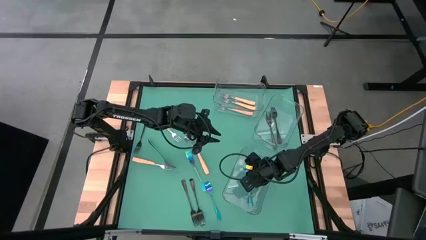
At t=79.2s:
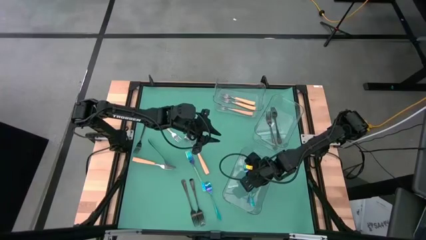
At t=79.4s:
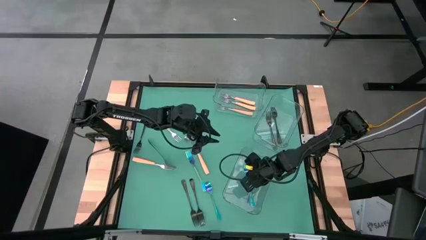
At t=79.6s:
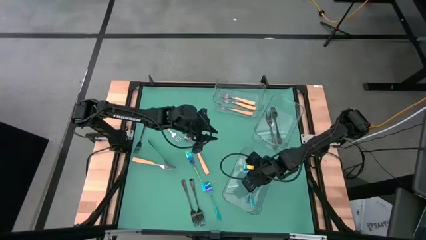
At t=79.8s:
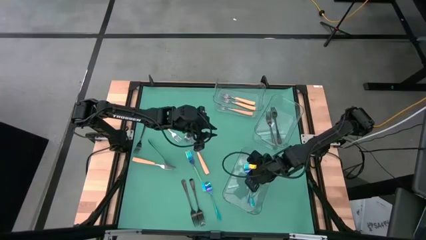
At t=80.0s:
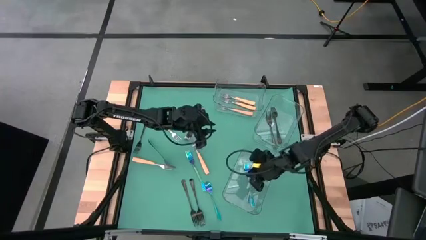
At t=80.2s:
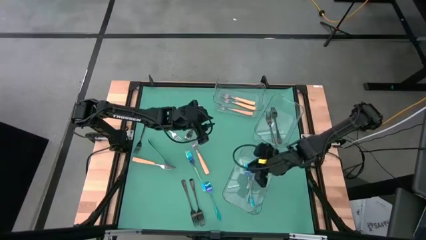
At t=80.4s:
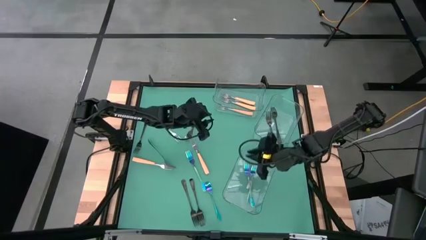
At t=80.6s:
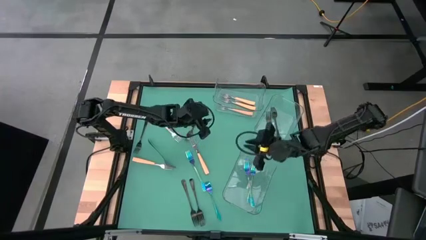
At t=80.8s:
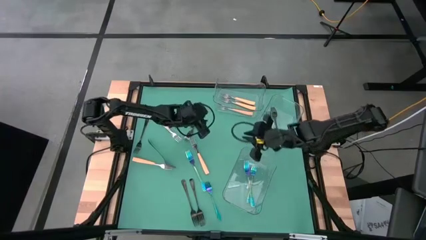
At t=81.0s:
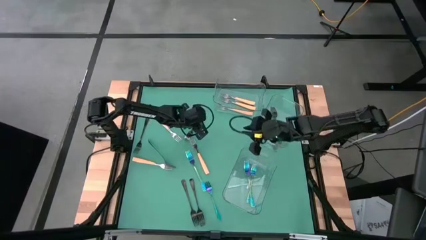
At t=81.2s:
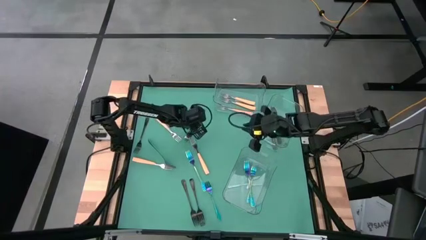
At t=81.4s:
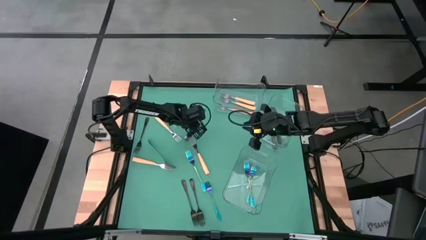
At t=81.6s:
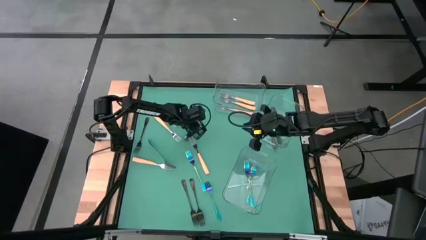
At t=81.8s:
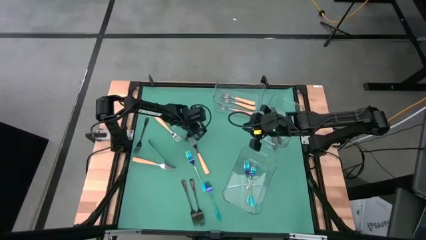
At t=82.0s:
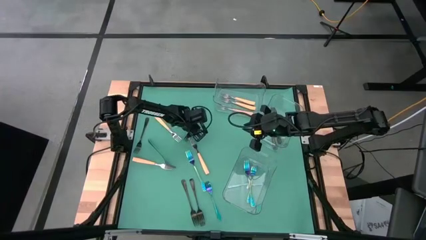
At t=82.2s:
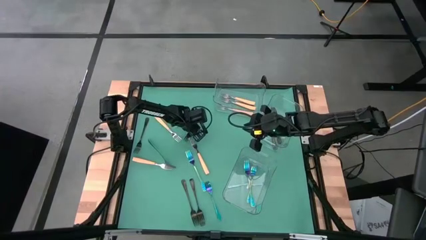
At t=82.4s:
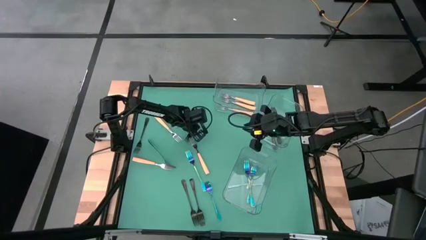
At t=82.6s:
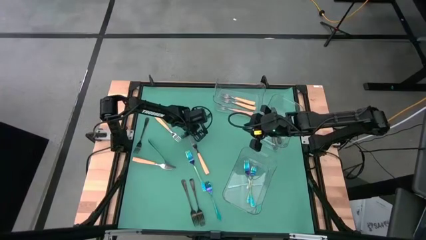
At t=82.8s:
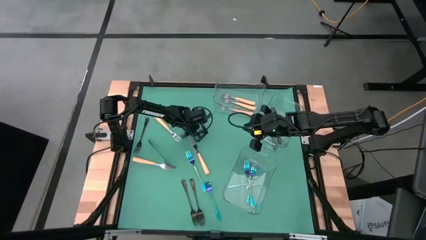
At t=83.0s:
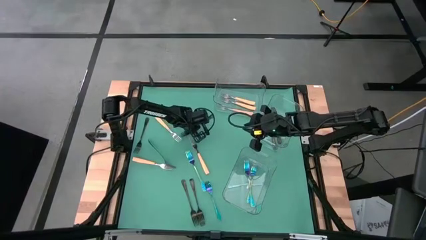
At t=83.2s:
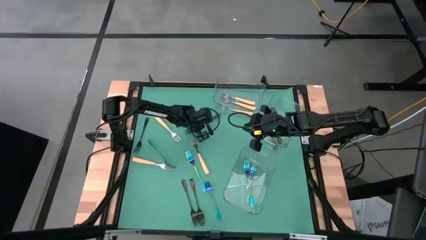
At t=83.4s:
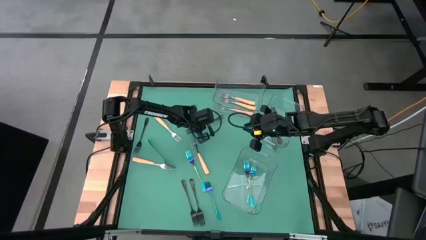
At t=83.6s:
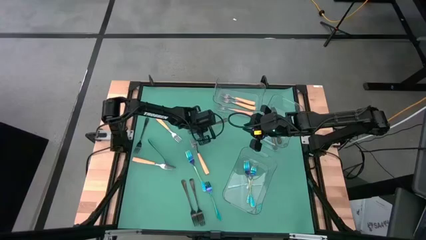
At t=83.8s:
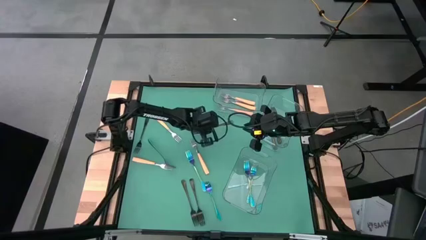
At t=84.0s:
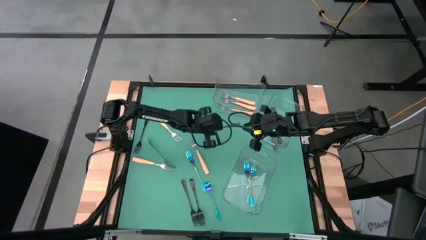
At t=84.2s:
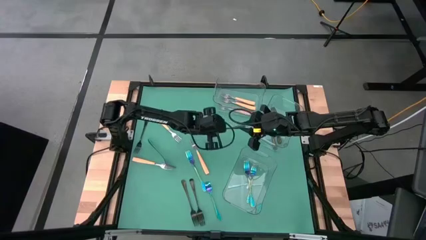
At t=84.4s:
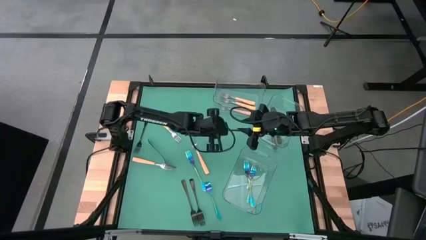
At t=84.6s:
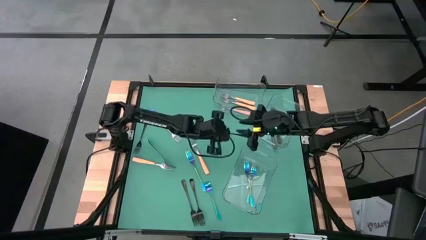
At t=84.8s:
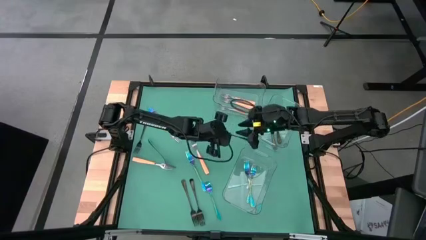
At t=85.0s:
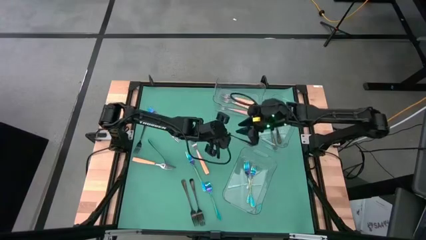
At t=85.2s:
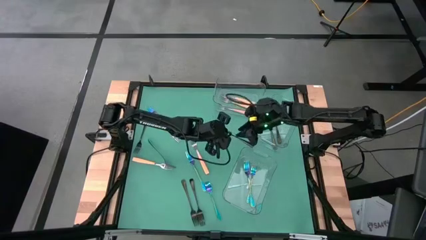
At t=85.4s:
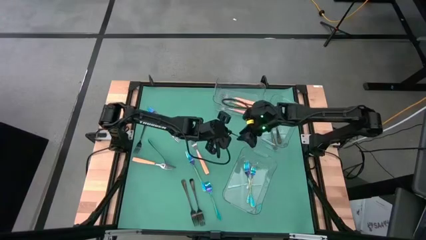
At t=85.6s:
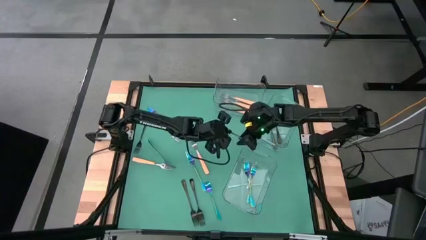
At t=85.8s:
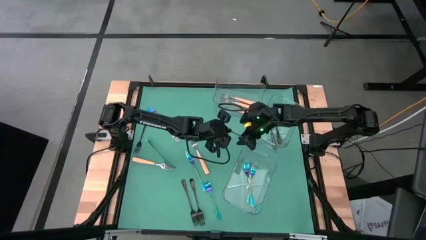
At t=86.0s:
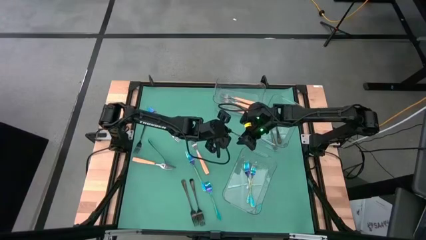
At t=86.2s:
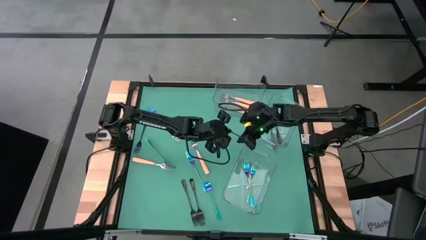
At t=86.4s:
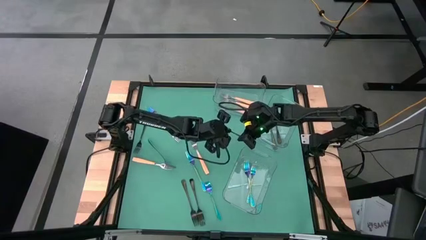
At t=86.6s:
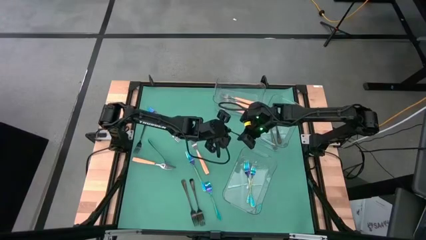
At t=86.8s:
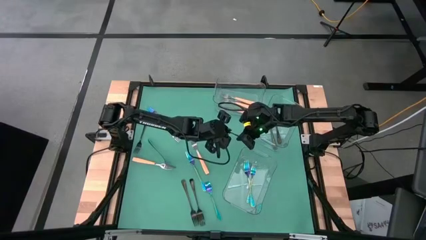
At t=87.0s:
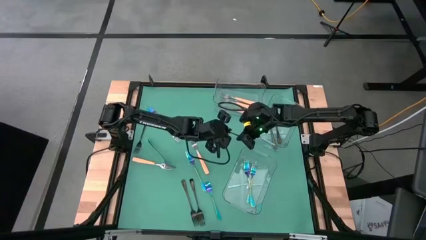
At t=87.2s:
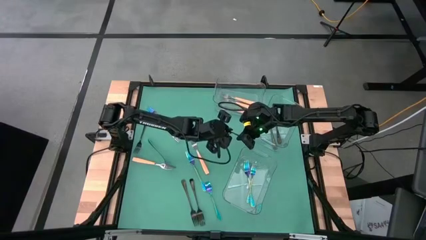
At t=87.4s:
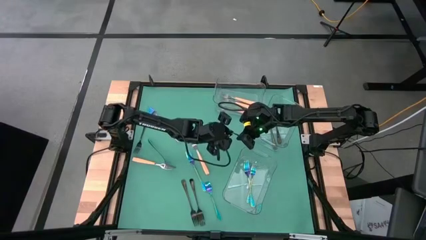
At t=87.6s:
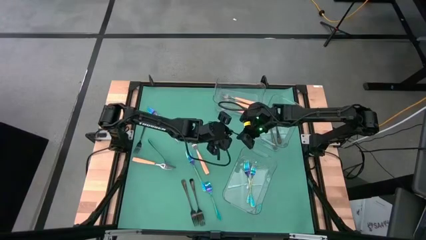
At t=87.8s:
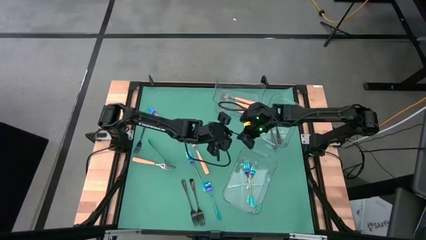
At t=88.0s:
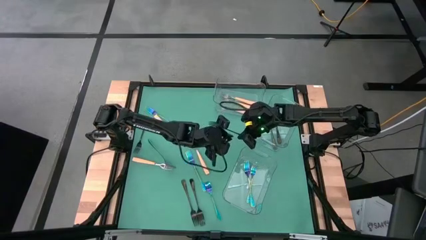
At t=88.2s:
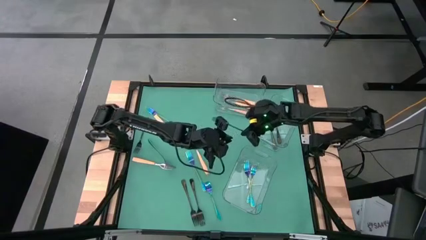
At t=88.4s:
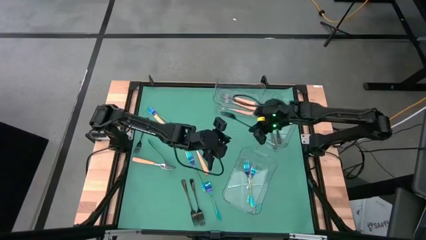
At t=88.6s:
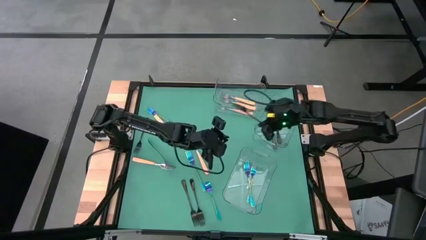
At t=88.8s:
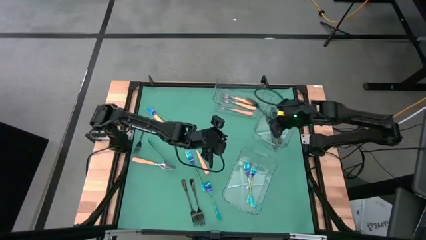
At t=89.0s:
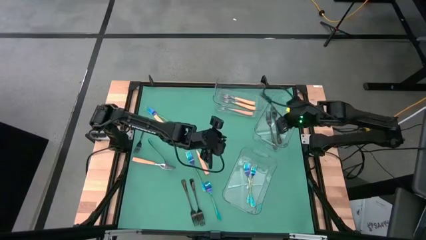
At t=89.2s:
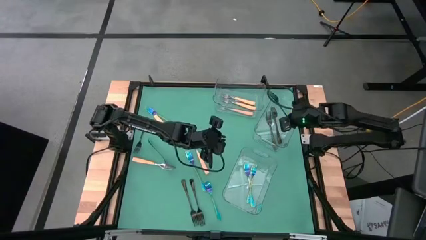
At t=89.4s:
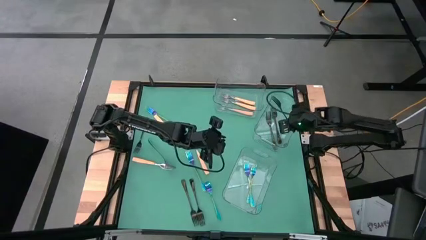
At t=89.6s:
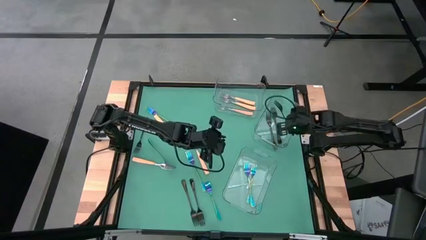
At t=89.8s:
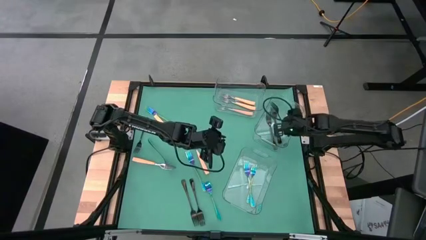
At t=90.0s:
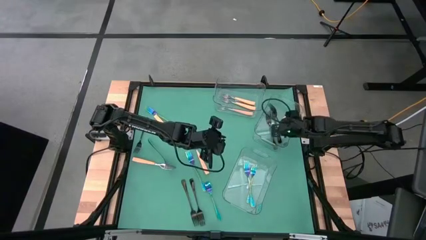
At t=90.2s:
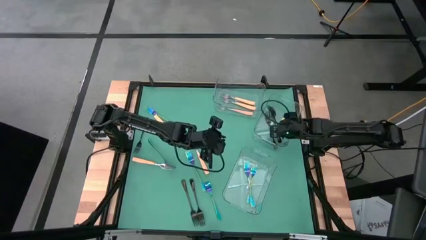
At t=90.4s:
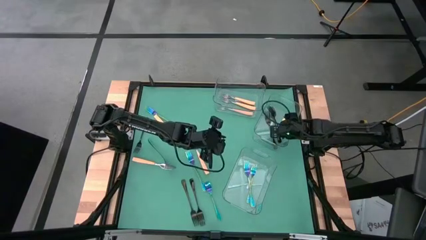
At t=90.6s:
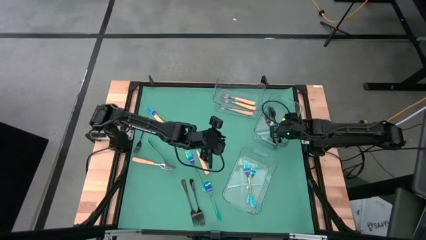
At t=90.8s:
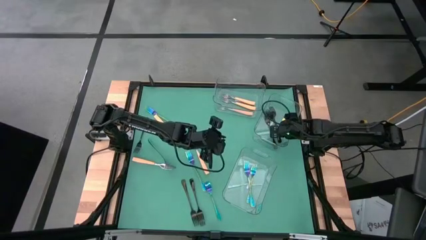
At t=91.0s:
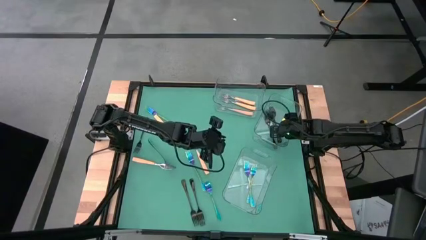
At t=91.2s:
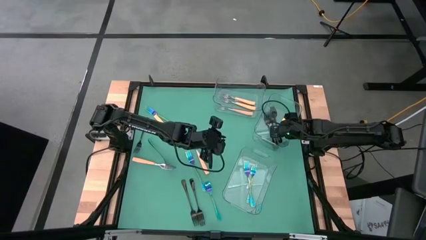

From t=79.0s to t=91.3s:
Task: Sort silverware by color (type)
Put the black fork into the center transparent bin

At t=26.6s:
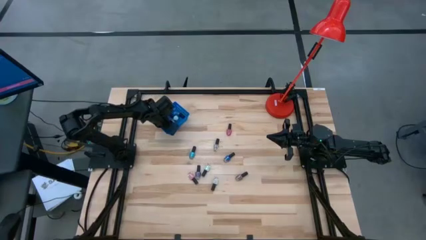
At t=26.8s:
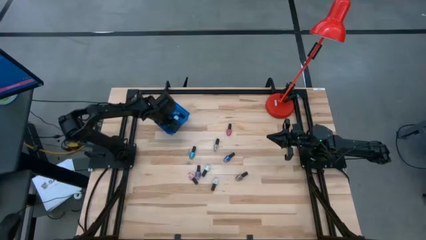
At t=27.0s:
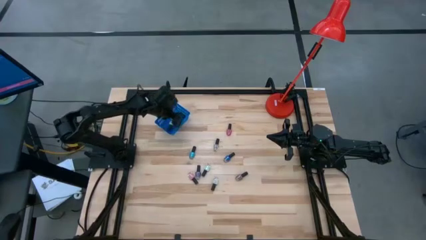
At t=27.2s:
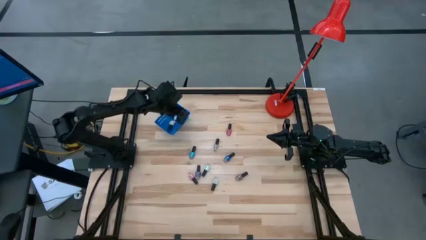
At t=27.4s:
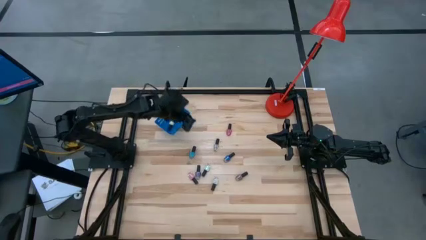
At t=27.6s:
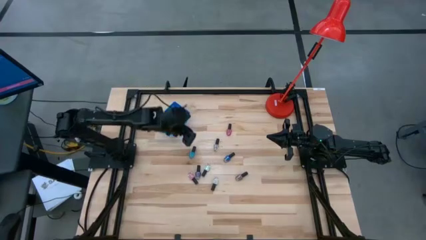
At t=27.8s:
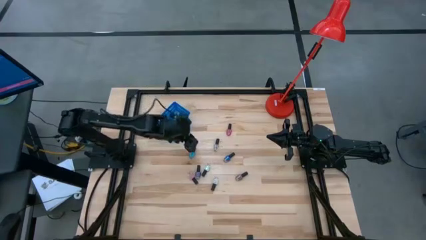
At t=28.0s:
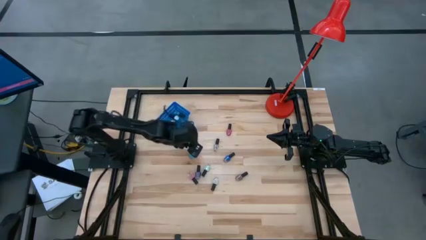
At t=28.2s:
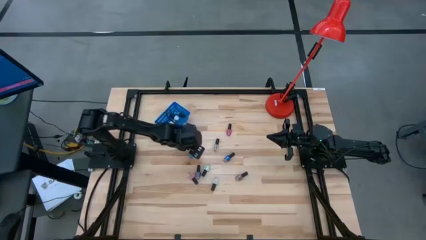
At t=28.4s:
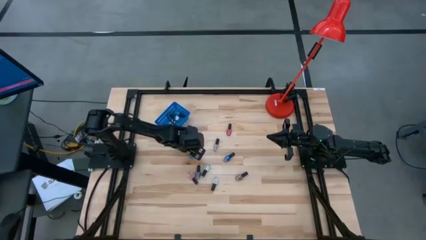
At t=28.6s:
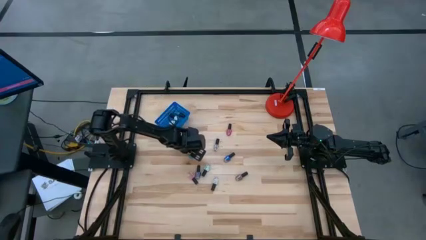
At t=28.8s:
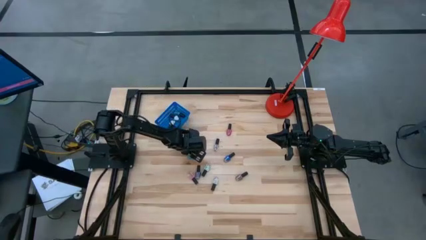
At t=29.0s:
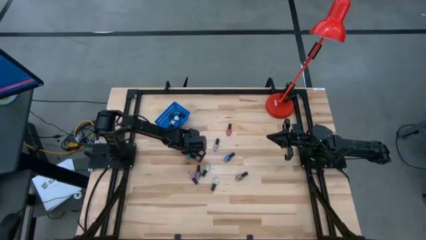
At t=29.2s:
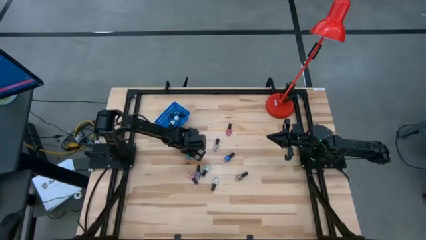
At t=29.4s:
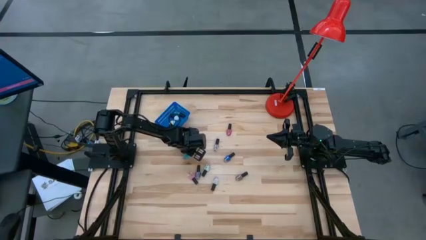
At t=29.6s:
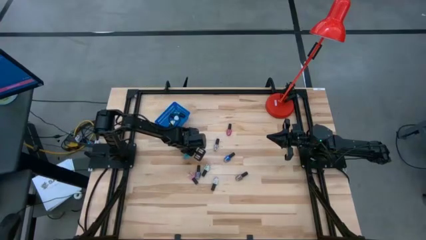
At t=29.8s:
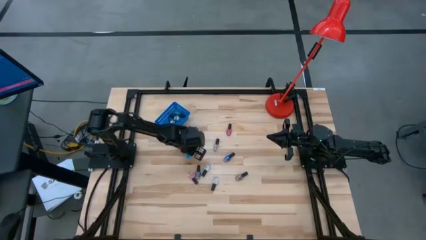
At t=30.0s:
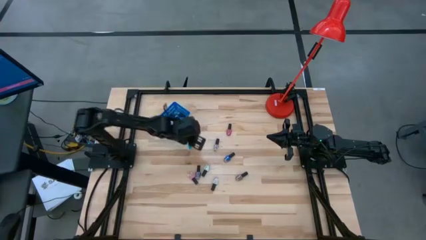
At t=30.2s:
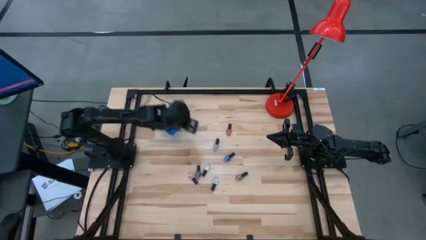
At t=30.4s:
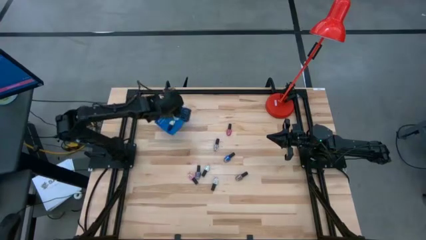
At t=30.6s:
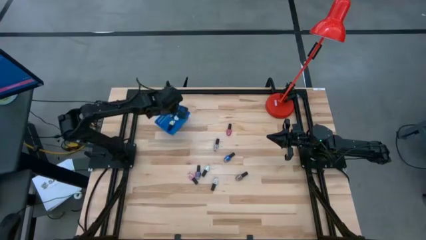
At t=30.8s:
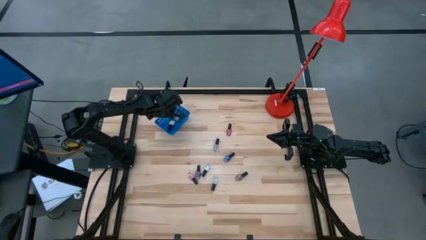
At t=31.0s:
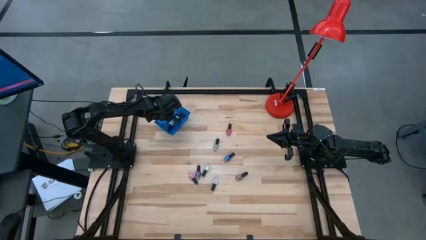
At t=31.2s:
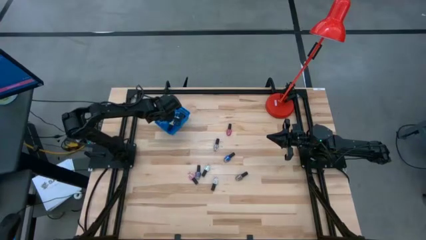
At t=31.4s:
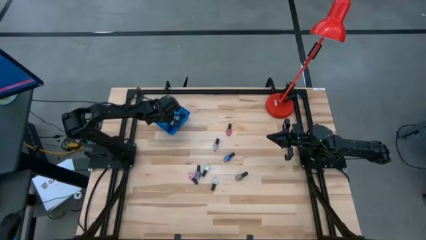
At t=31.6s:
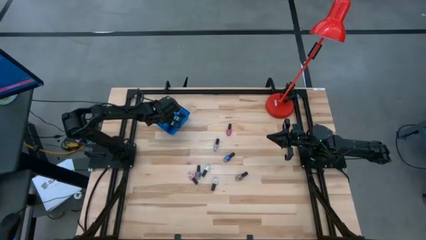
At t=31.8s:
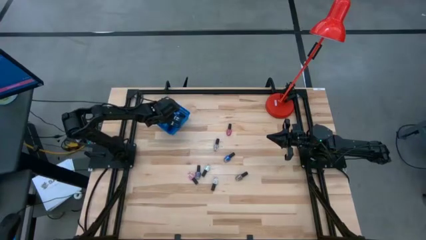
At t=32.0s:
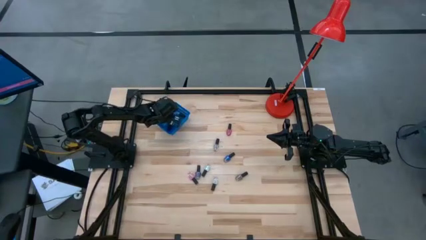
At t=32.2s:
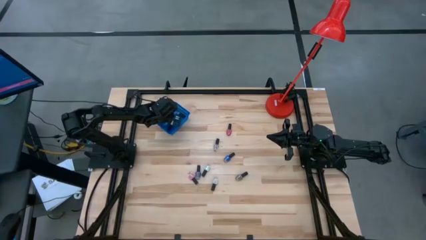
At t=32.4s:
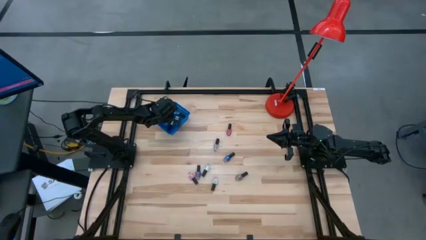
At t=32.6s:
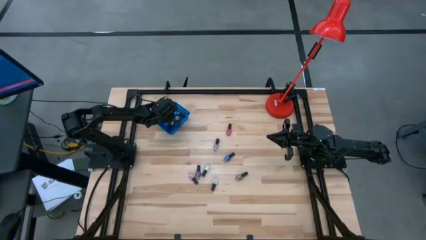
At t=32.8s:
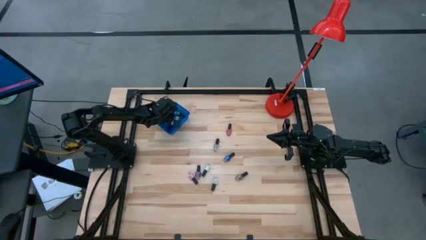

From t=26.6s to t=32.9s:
Task: Pick & Place Nail Polish
Put the light blue nail polish bottle into the blue bin
